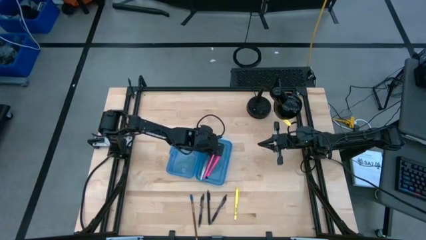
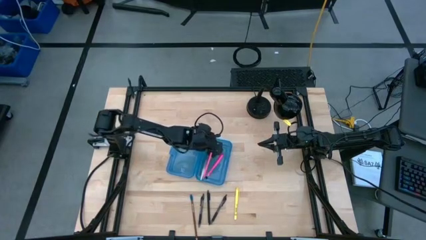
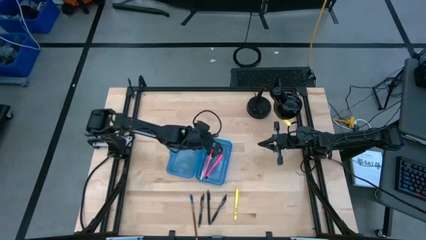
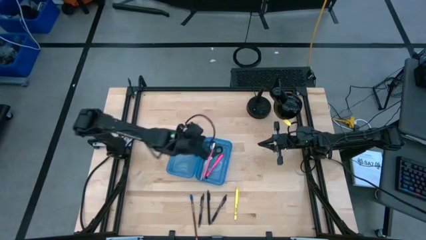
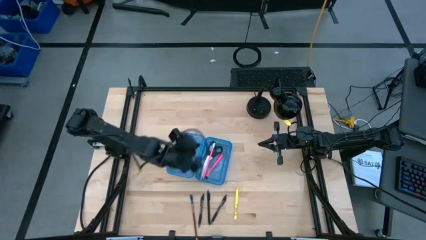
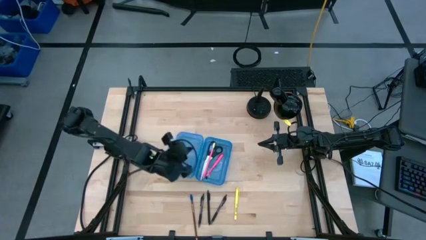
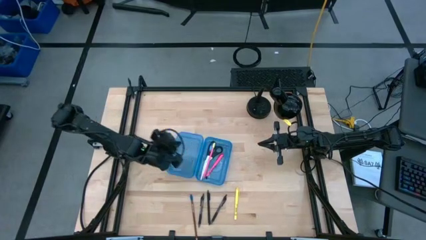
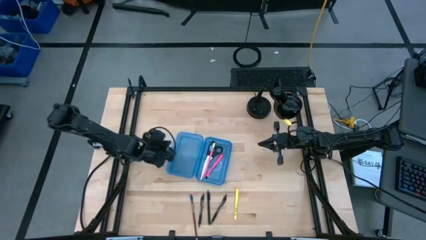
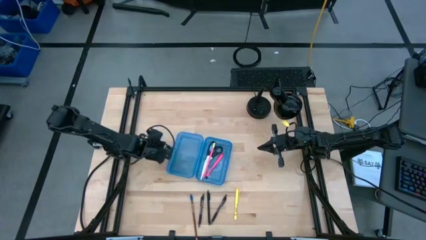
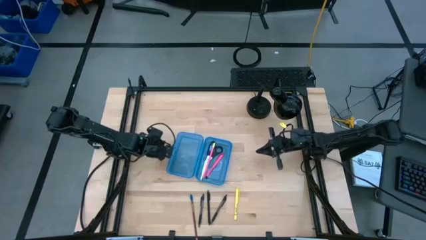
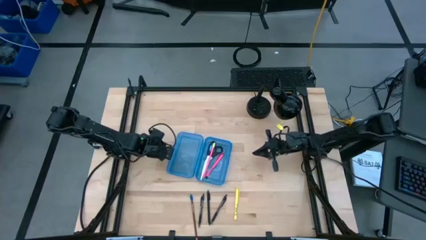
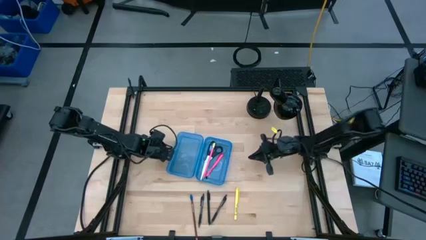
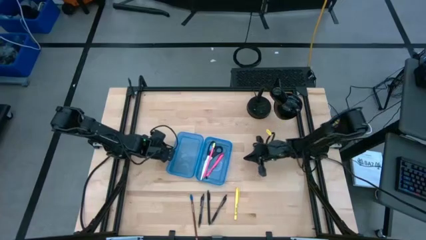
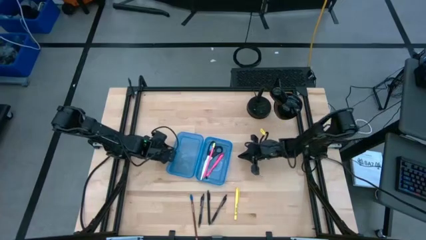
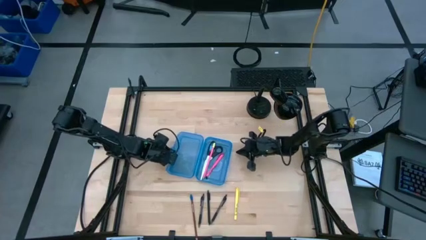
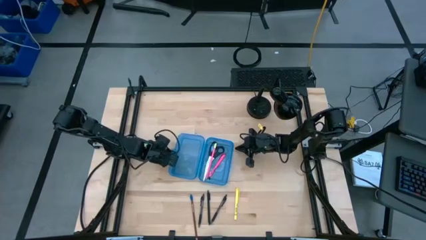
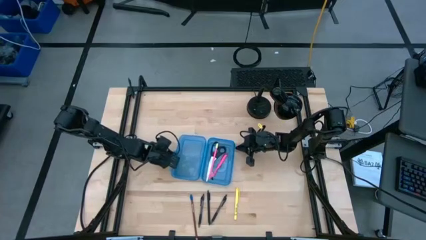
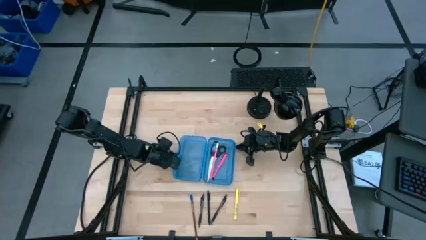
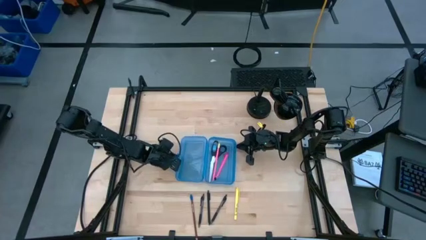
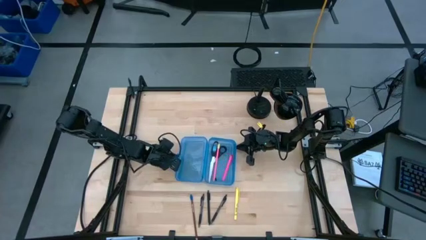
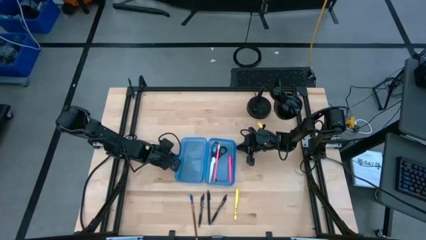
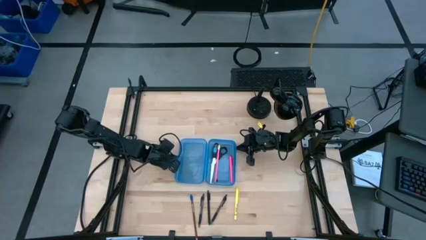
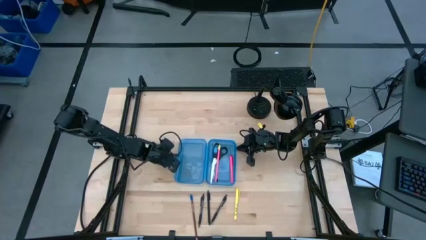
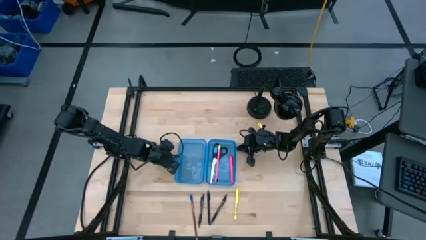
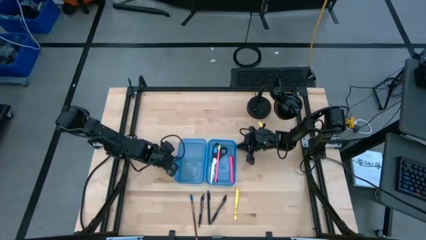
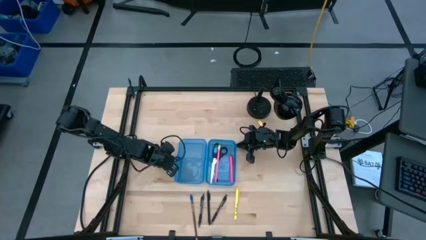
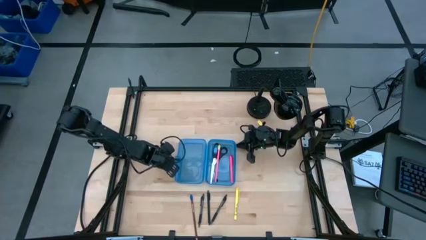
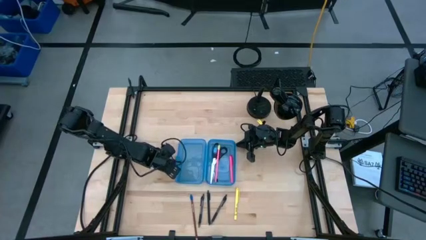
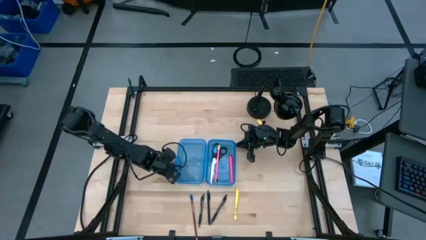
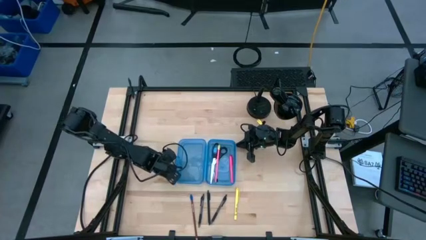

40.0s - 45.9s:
Task: Pick & place school supplies into a supply box
Adjust the blue supply box

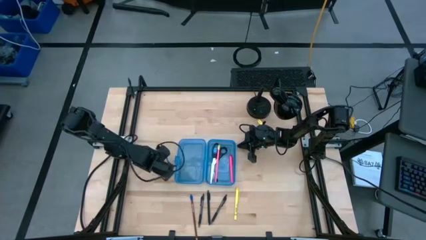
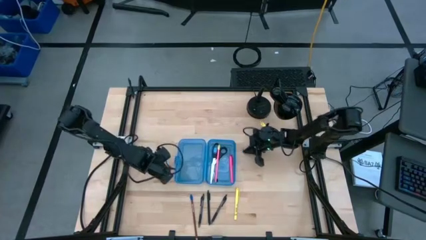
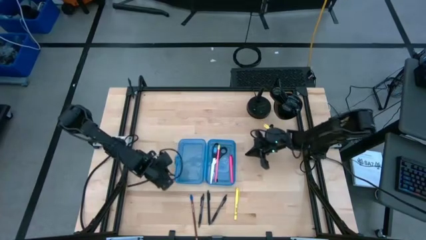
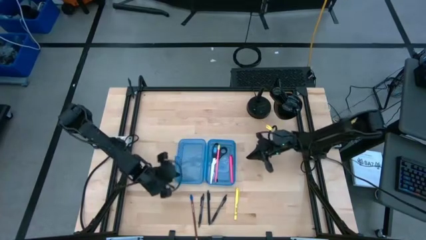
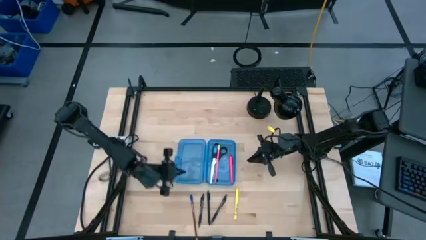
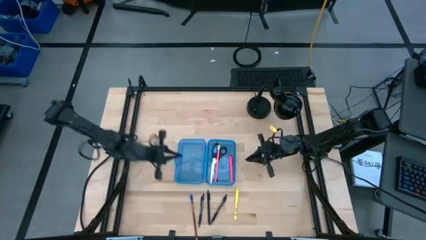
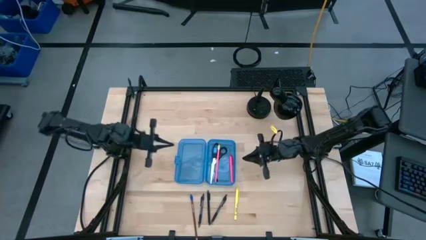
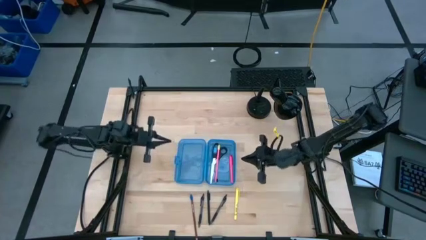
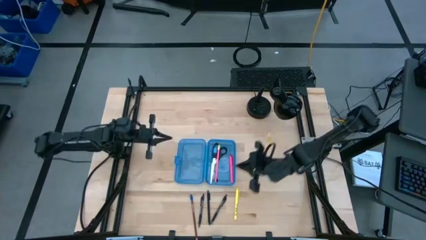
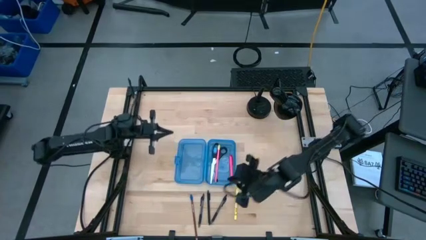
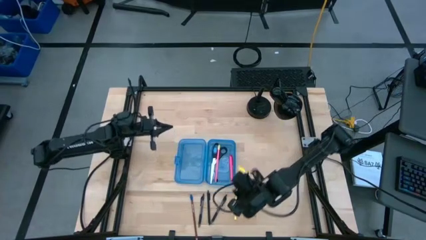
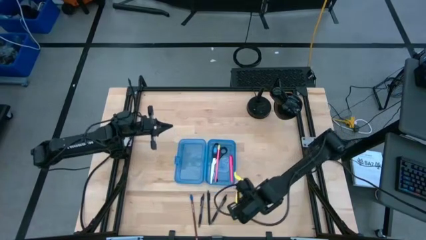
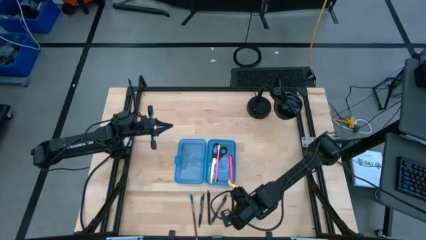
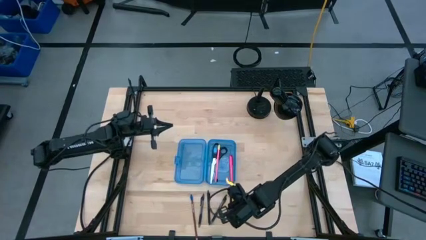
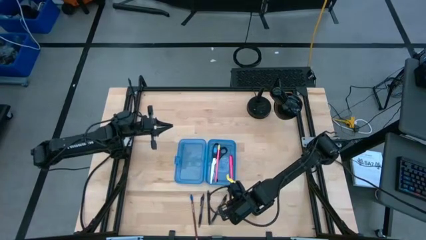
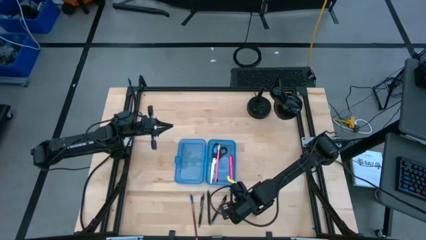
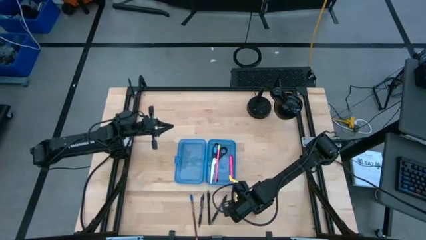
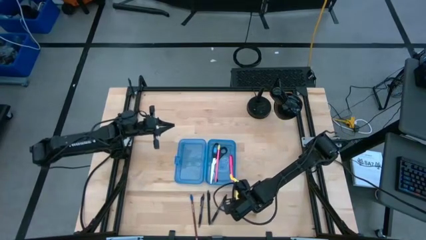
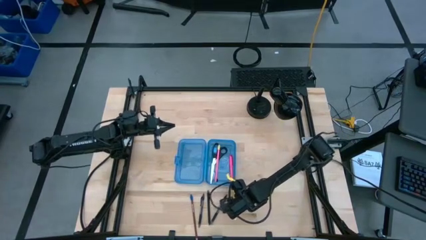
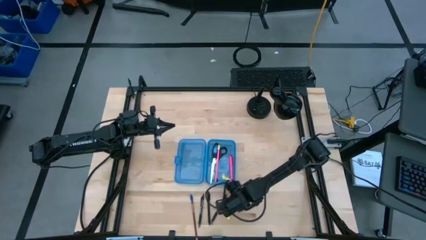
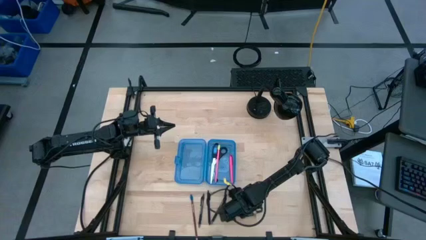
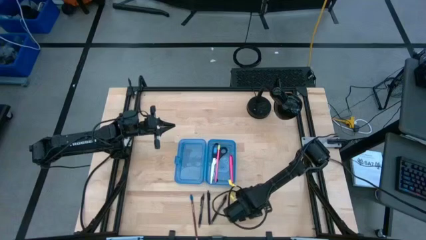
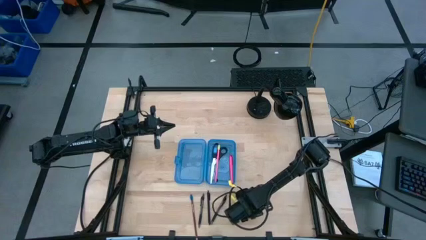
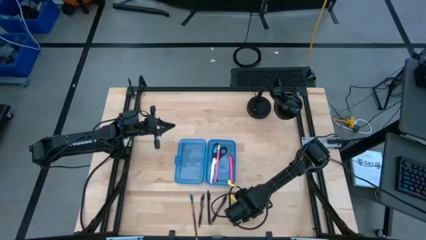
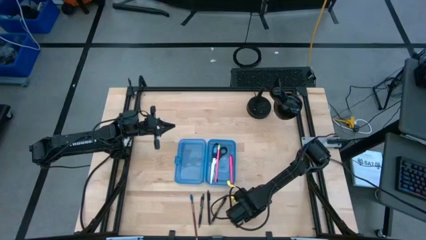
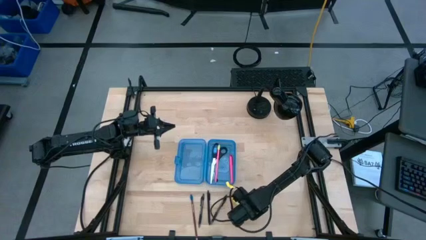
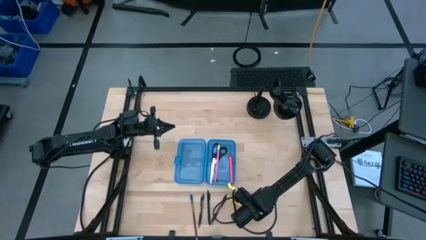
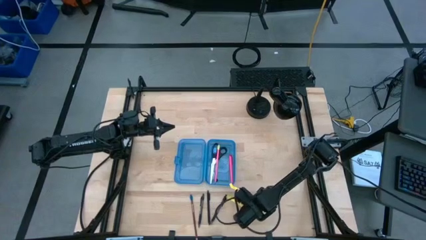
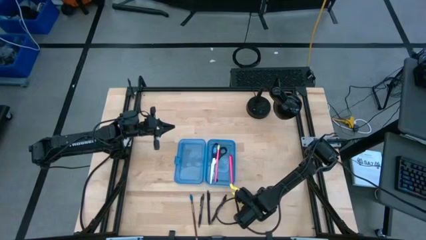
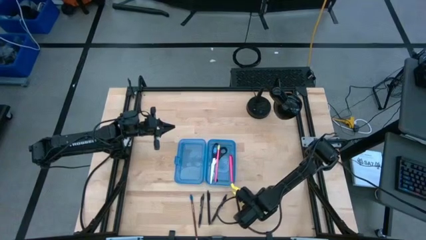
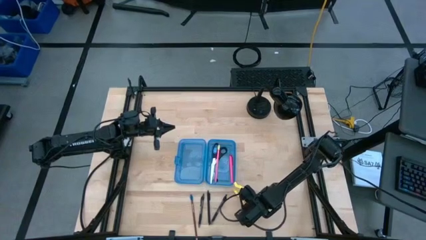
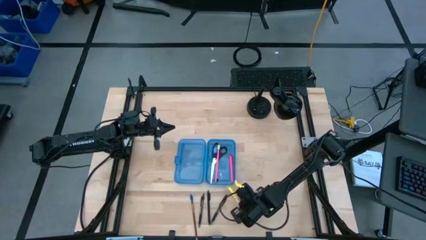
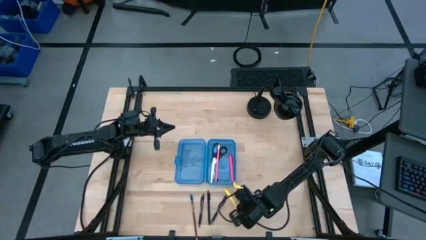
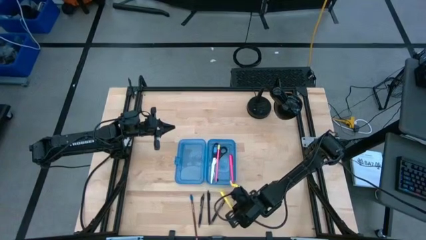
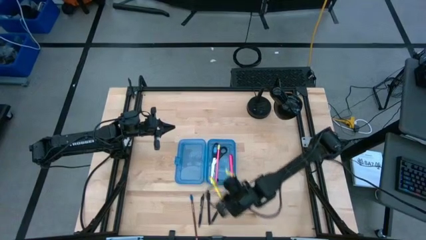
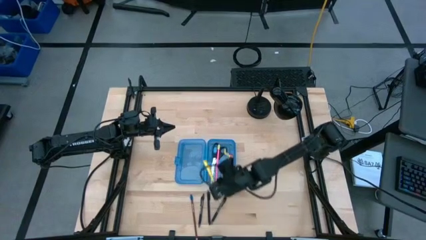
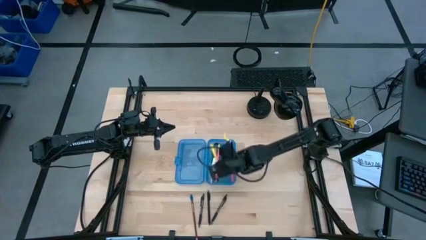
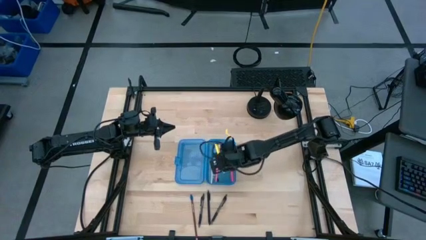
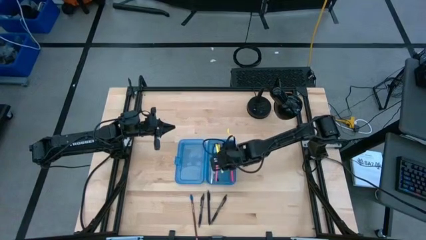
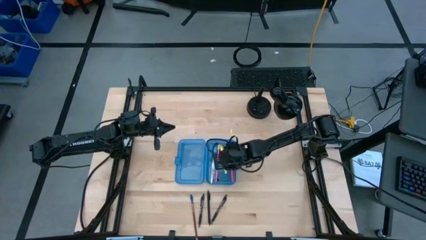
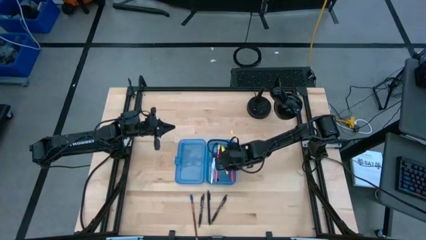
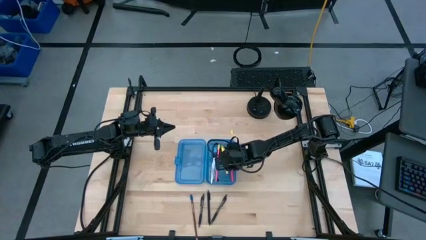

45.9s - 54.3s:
Put the yellow pen into the blue supply box

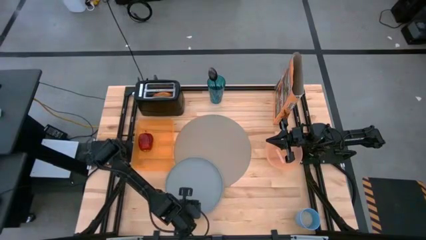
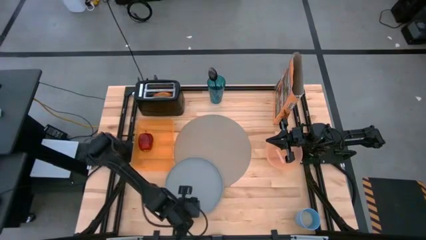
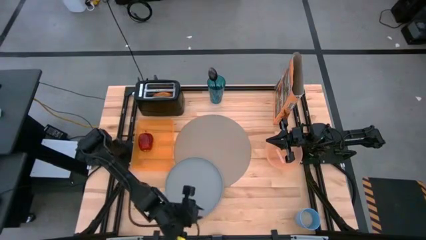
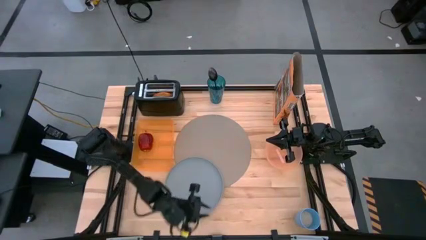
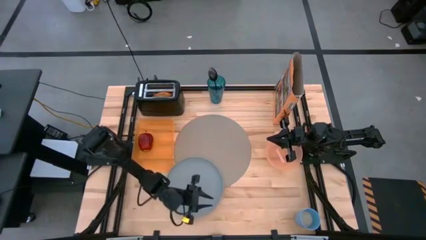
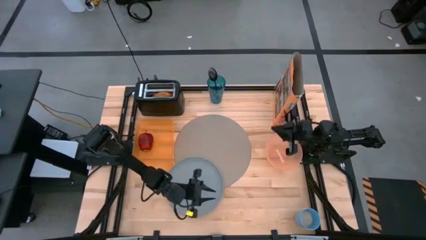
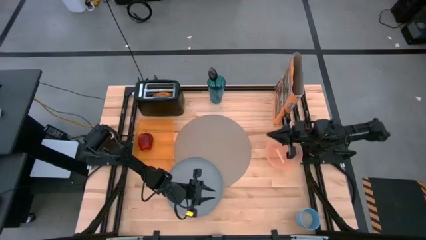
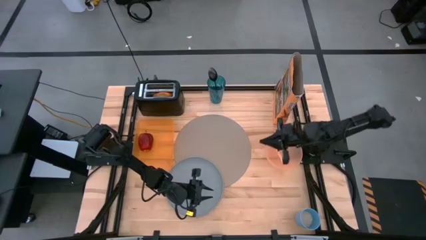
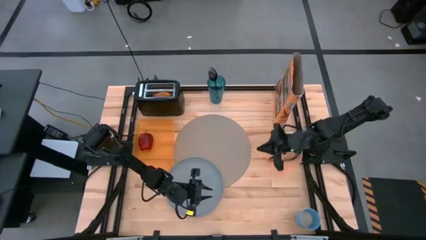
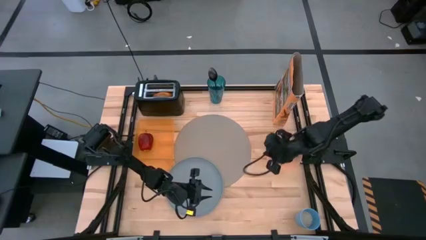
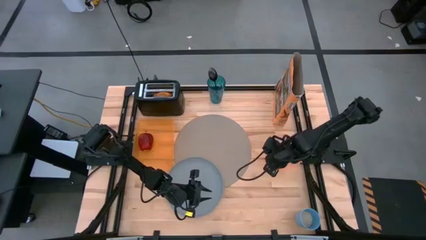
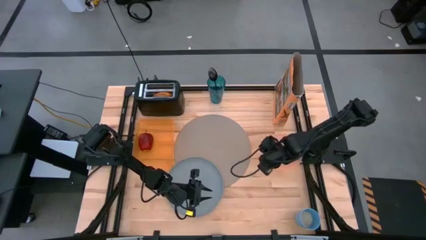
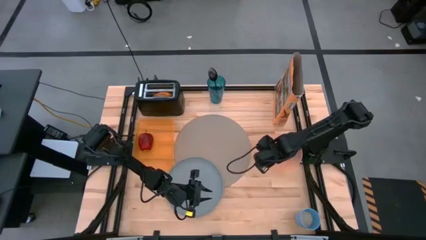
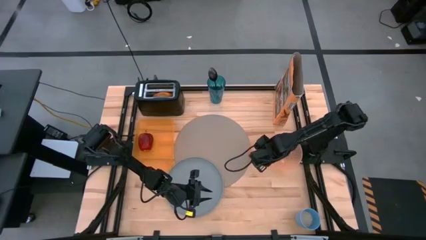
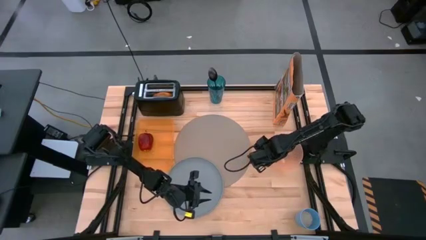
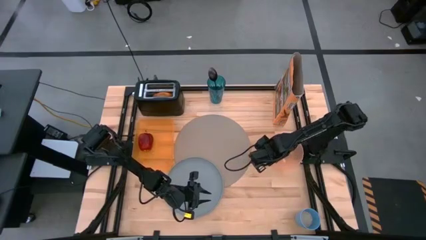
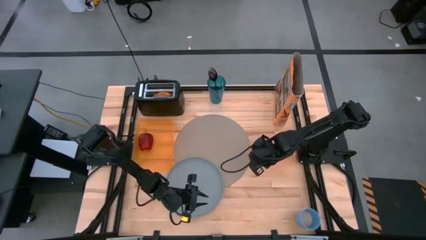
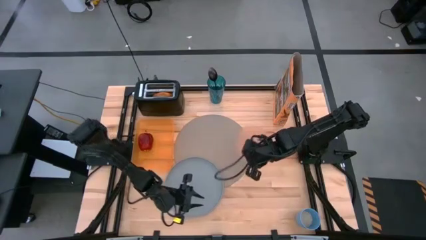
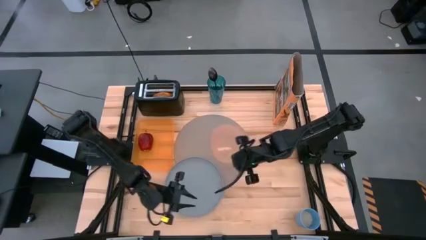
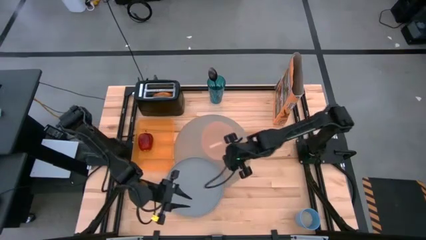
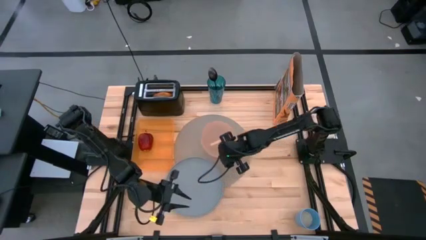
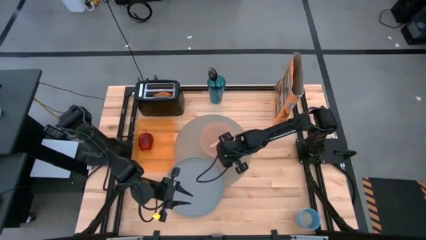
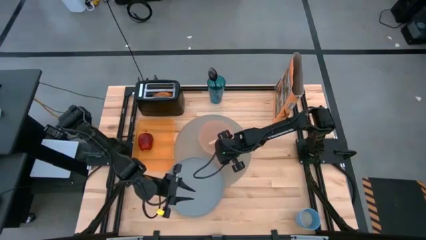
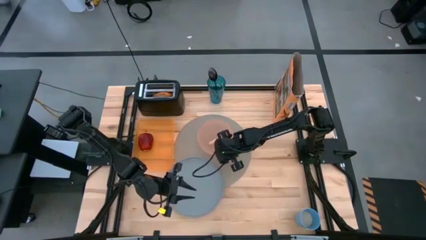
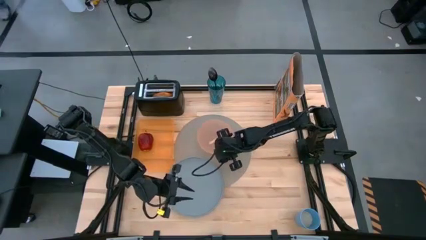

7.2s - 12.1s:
Task: Arrange a breakfast setting
Put the orange bowl on the gray placemat to the top of the blue plate
